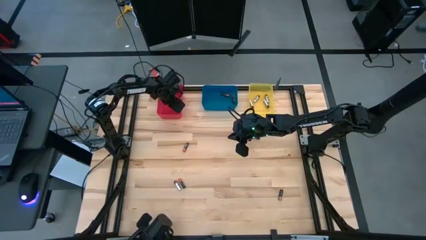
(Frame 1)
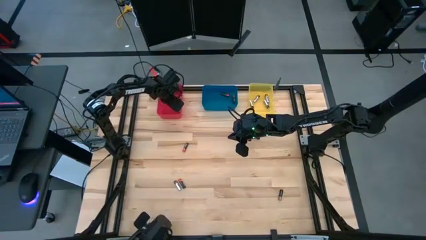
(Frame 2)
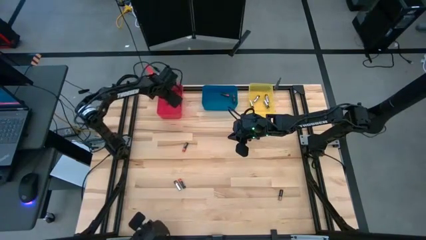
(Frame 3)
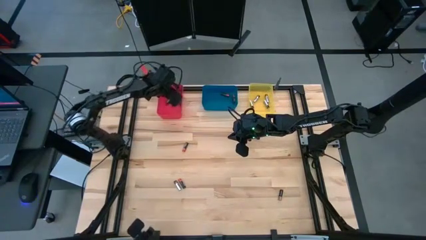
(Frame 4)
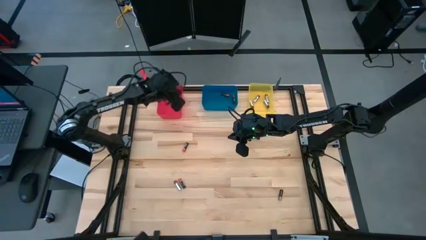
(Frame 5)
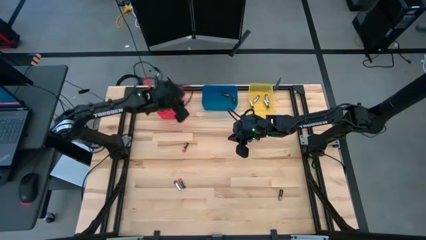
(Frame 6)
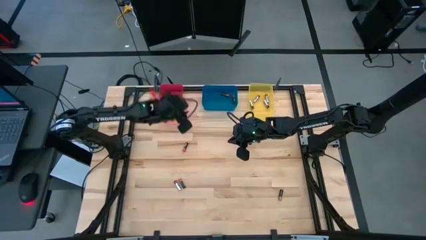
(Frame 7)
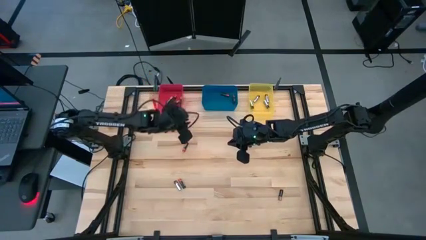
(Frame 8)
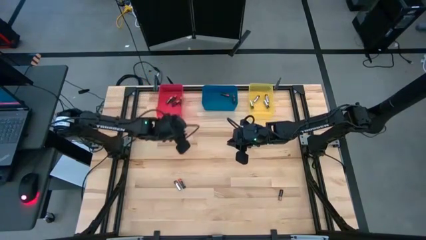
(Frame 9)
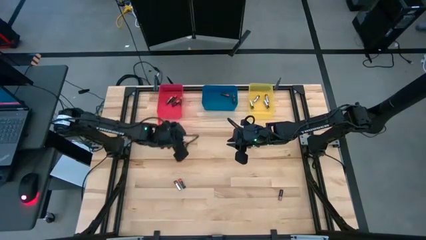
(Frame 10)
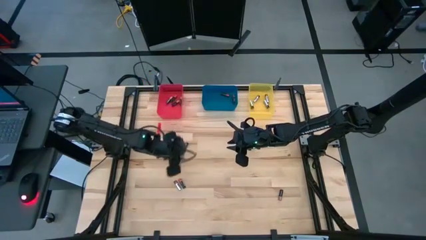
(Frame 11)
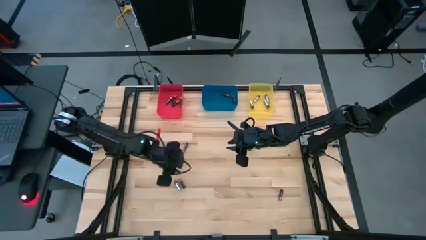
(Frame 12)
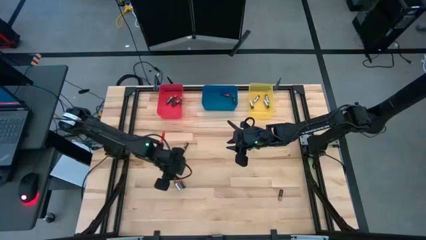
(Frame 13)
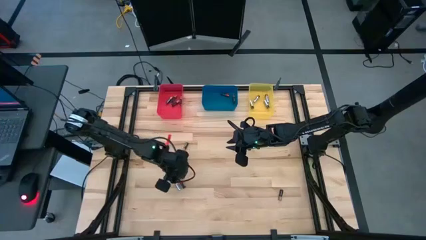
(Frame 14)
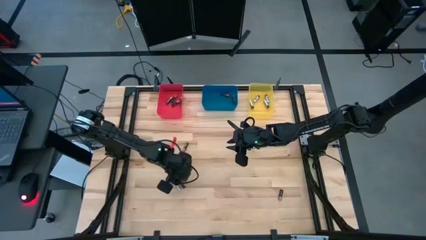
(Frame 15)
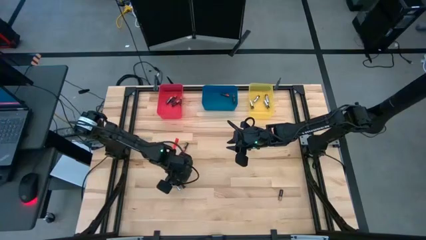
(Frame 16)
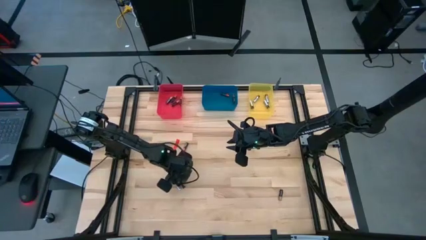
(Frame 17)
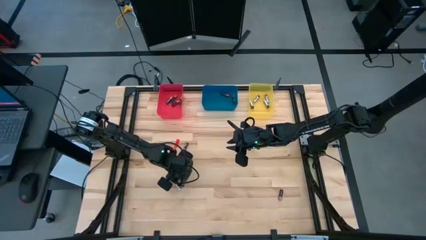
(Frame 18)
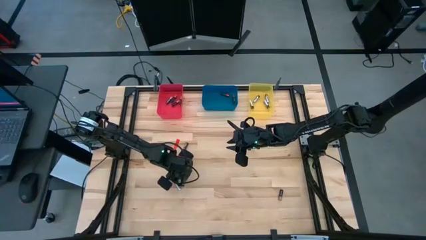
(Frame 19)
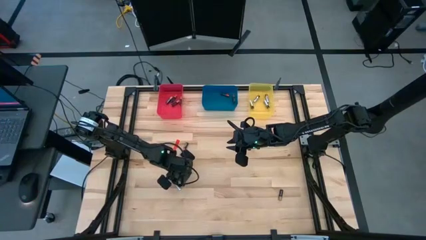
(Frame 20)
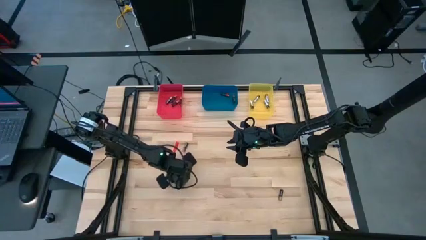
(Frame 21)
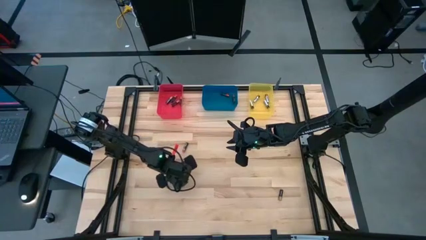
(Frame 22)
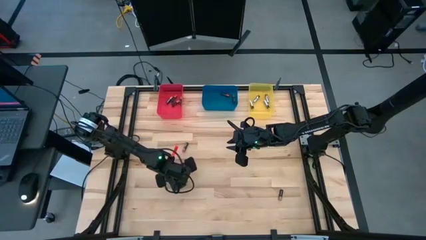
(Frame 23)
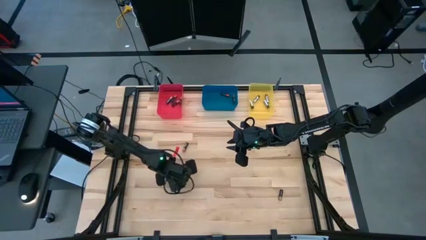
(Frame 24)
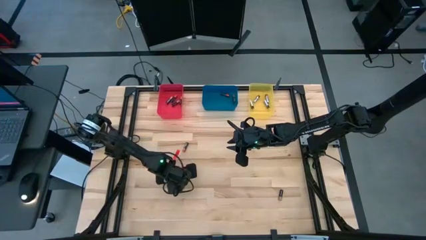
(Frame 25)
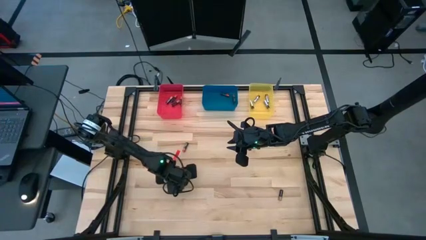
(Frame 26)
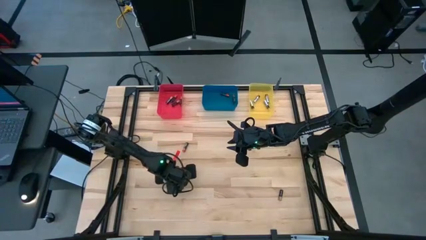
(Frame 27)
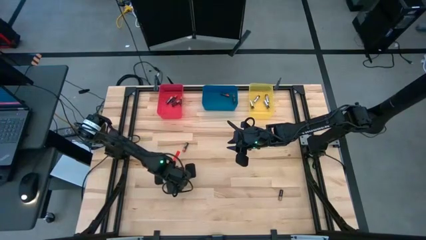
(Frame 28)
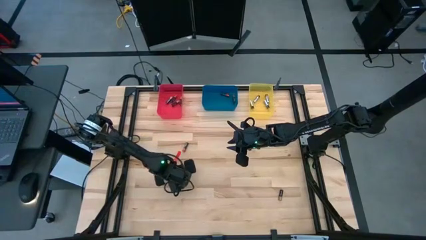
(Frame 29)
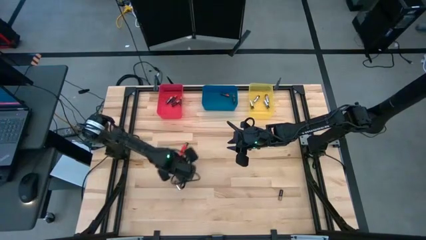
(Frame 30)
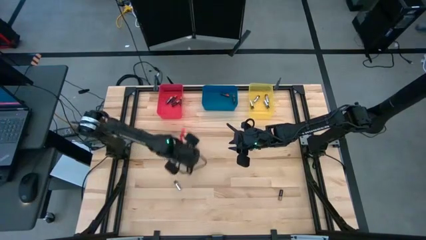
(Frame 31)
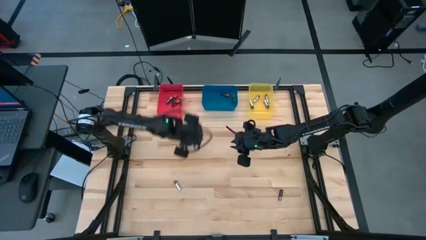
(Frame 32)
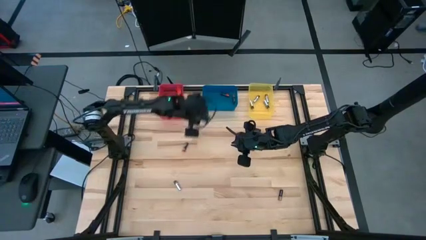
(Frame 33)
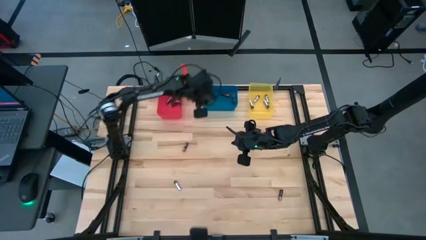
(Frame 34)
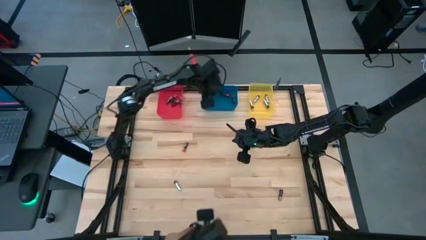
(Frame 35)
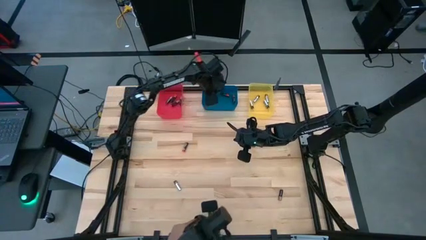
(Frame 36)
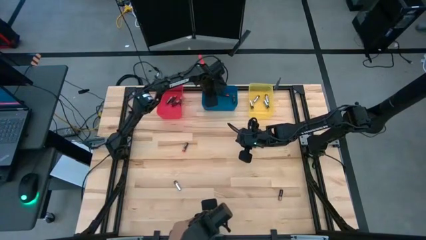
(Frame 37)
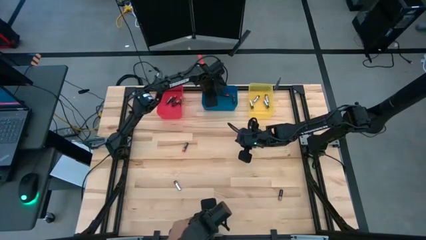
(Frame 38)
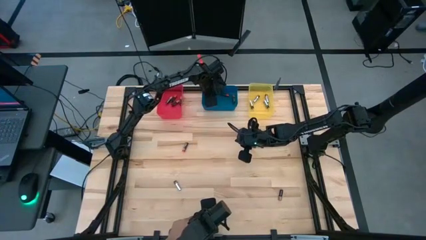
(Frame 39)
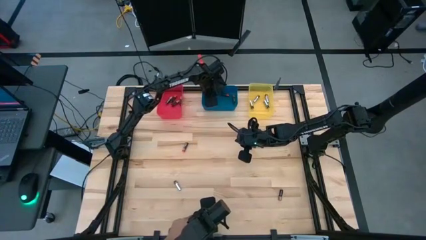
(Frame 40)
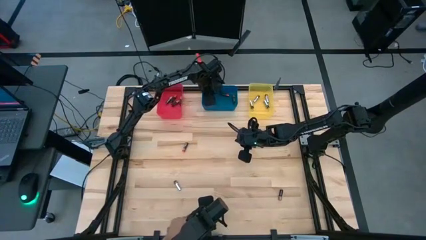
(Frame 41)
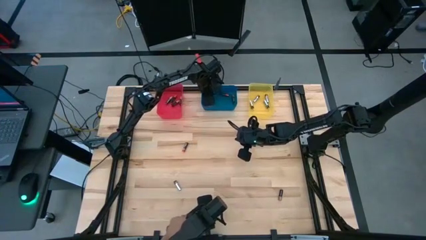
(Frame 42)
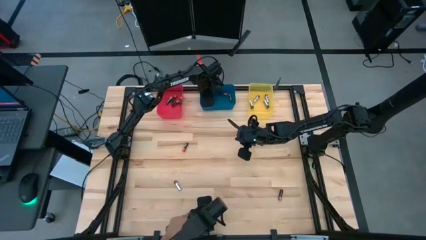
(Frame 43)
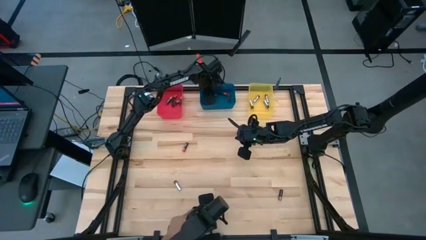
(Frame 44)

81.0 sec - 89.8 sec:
Task: Sort batteries
Put the orange battery into the blue bin

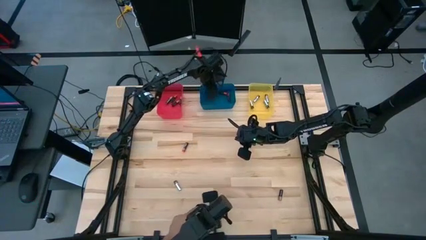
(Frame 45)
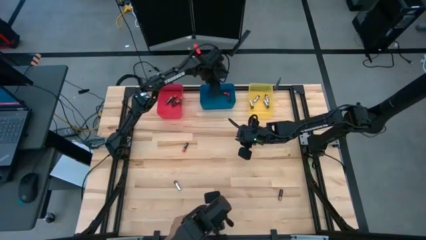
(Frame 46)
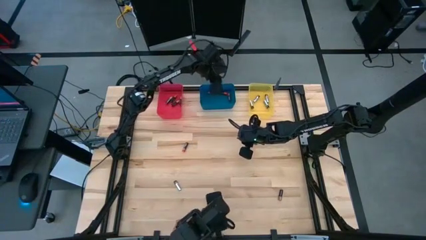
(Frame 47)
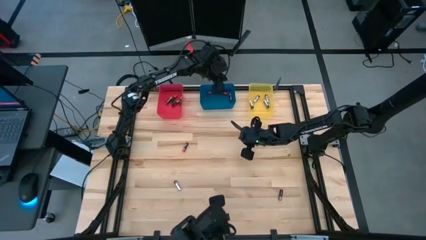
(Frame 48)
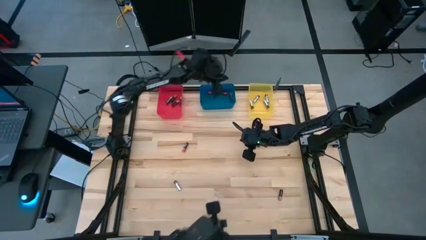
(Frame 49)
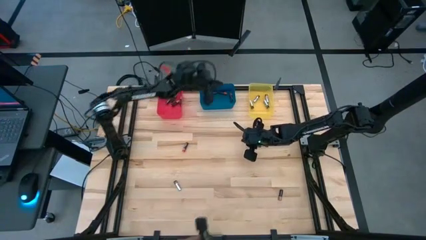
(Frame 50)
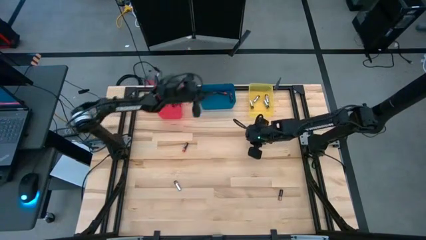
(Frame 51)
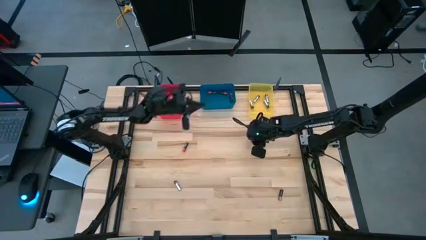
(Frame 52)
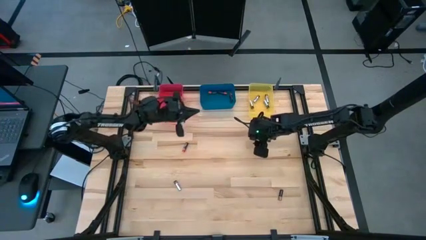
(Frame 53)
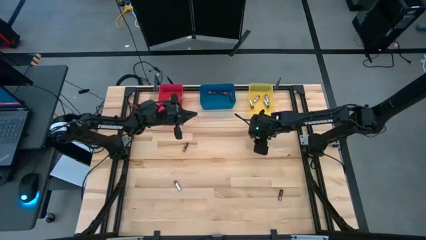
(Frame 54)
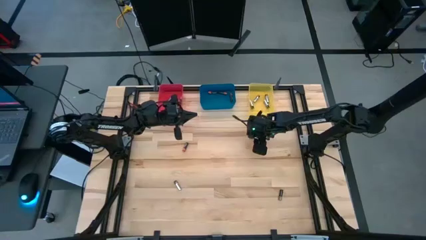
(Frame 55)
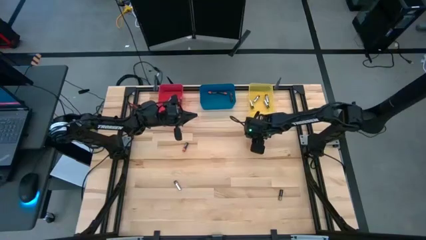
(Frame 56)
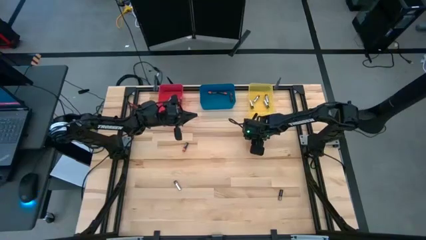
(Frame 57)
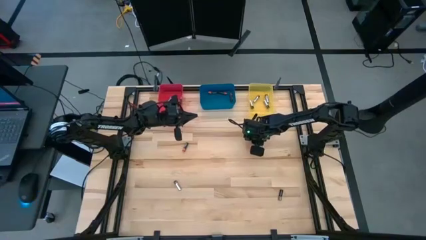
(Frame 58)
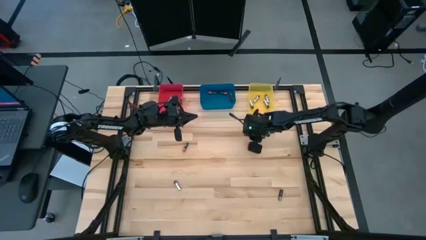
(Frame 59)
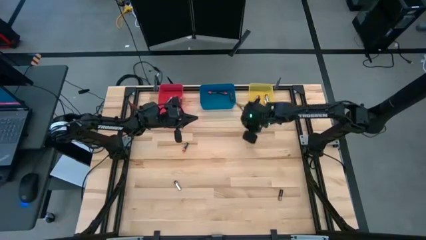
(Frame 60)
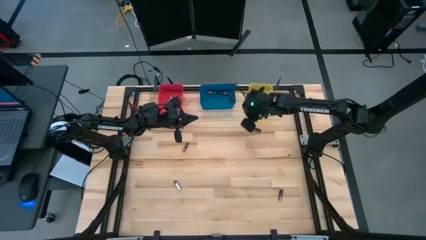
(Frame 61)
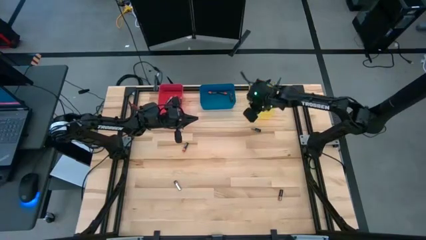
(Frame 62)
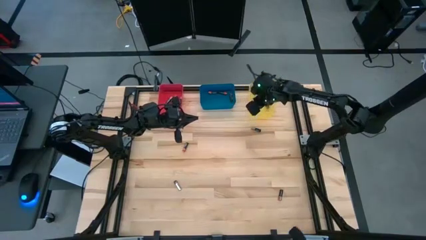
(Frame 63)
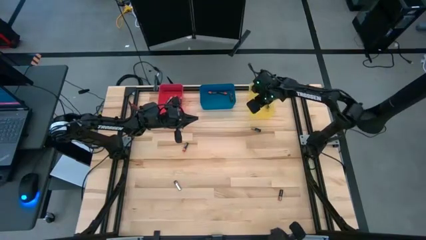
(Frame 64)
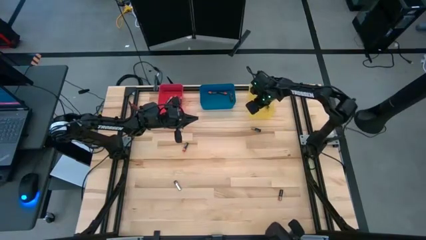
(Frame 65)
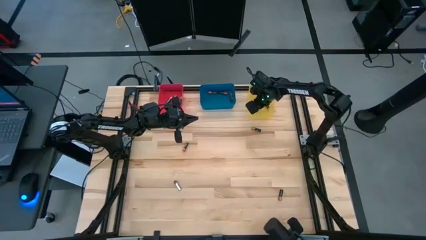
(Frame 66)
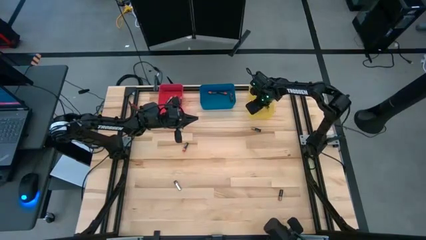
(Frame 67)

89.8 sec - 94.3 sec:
Put the silver battery into the yellow bin
